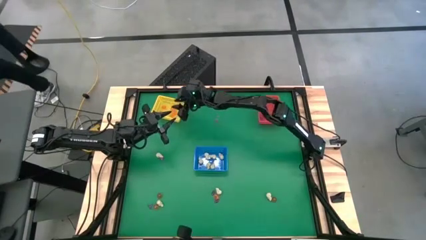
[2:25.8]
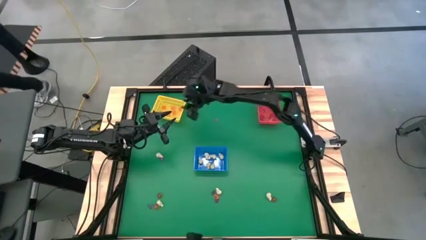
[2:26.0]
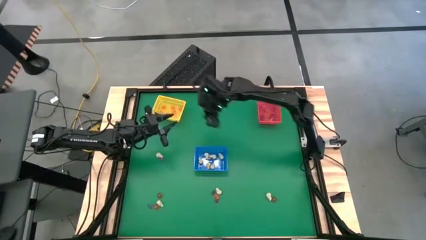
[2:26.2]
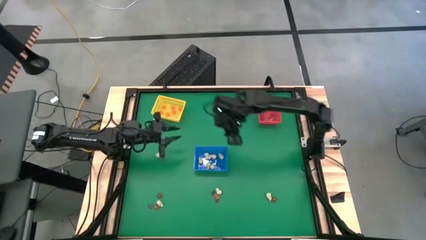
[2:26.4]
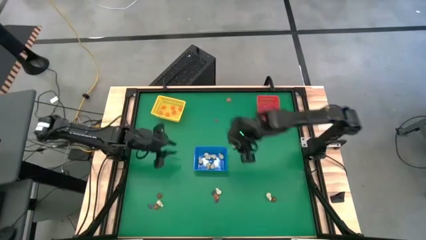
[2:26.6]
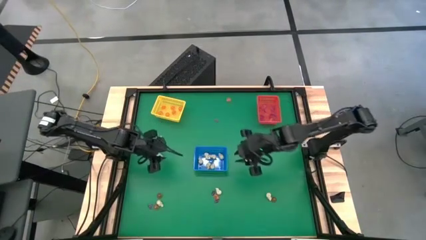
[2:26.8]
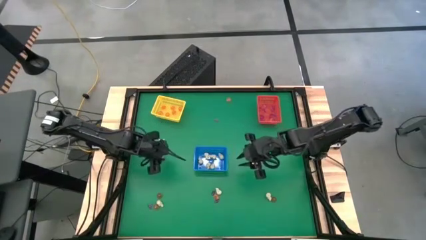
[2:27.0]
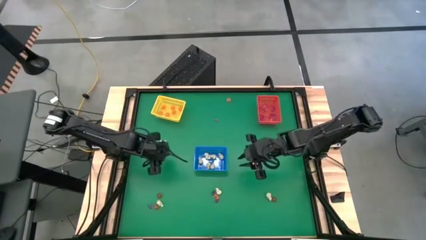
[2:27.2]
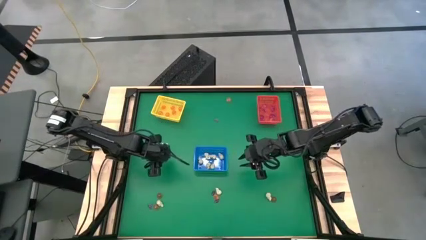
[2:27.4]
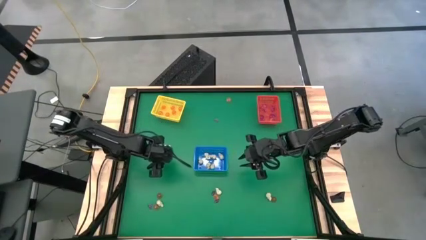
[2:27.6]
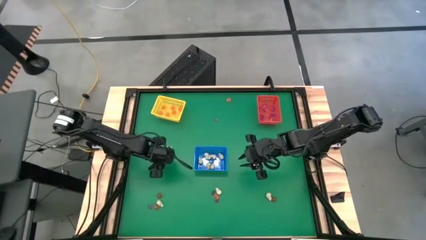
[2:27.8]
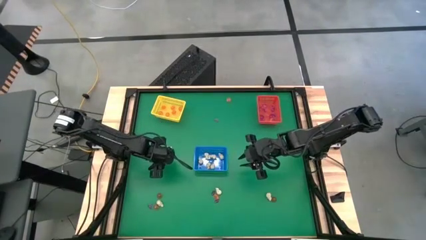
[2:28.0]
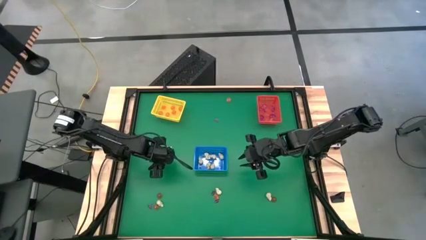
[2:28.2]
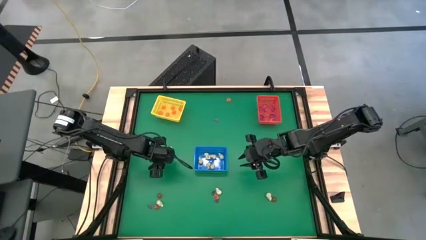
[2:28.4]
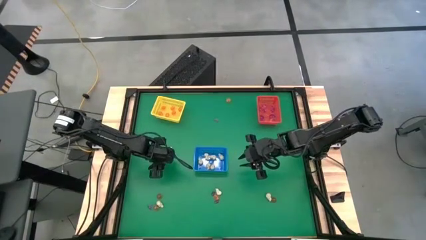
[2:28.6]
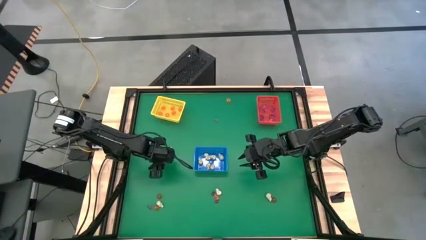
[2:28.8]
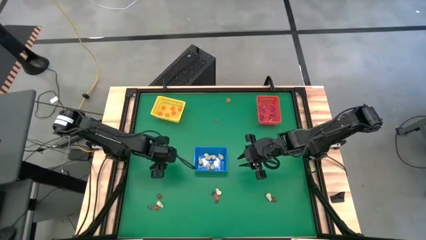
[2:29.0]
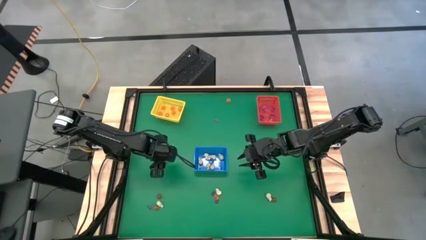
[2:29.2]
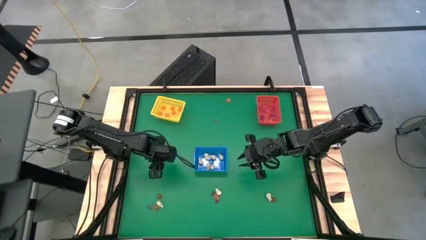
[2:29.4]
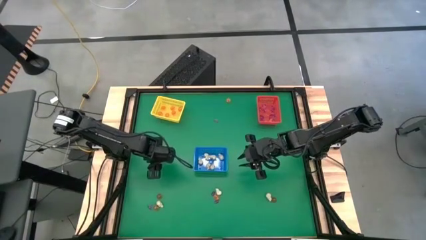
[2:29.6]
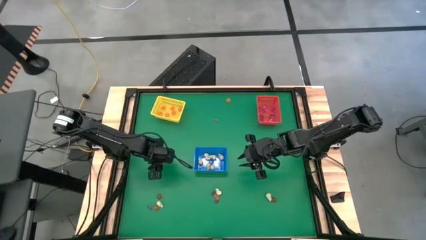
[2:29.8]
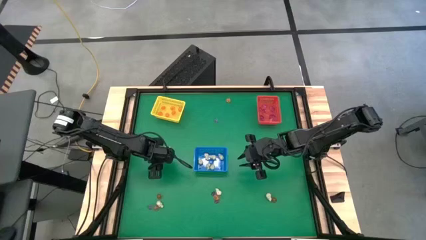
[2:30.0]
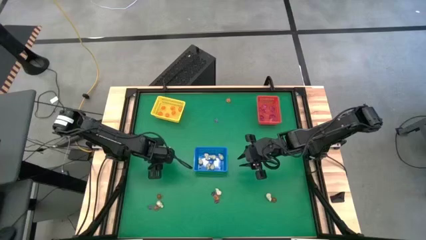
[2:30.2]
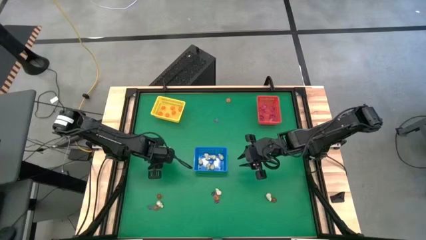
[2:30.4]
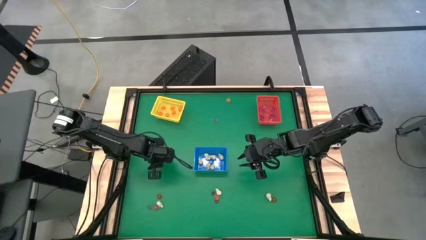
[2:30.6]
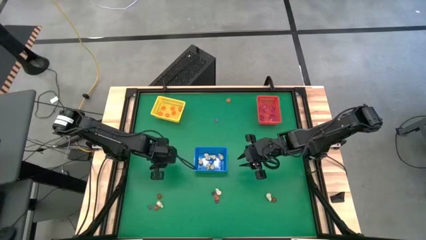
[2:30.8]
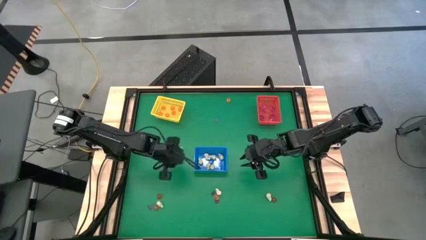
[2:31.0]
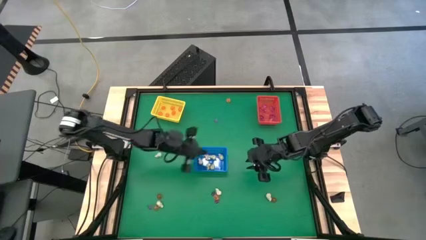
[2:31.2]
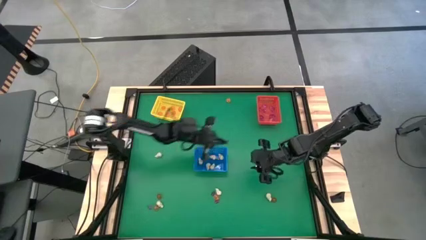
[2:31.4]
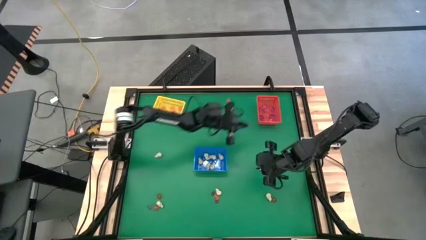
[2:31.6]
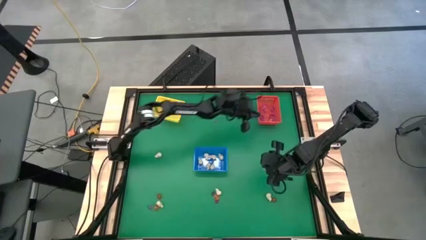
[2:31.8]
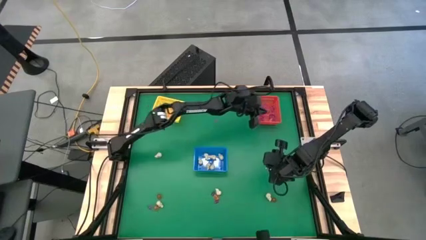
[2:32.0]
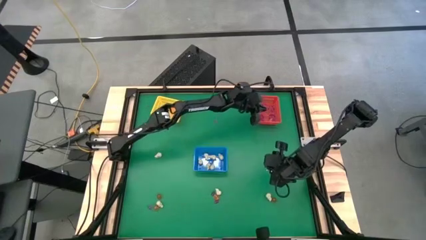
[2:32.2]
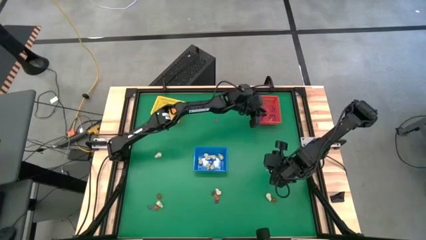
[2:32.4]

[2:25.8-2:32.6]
Task: Sort Halloween decoration
Put the purple witch hat toy into the red bin

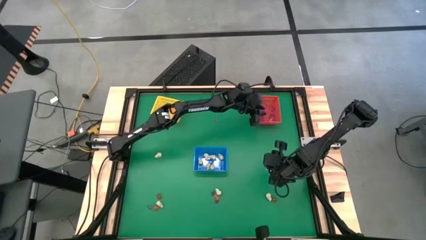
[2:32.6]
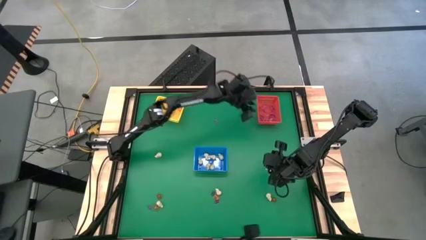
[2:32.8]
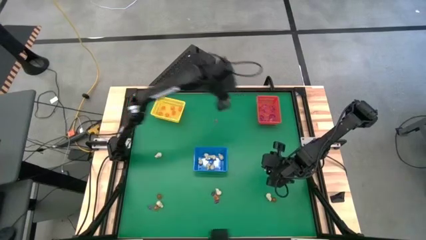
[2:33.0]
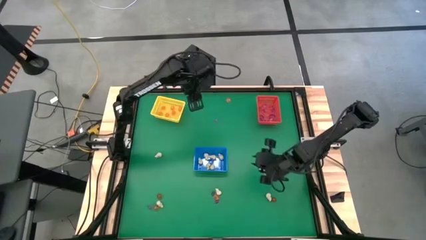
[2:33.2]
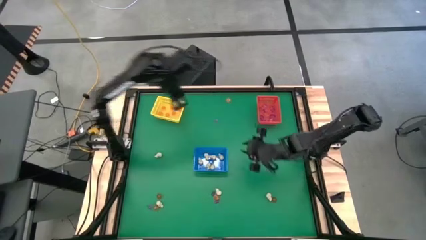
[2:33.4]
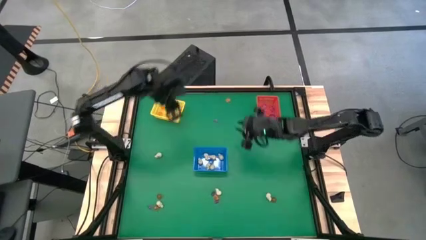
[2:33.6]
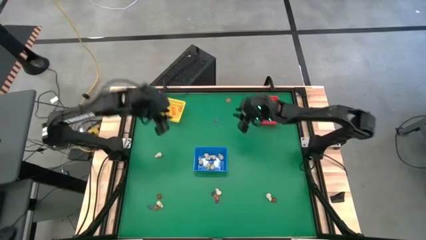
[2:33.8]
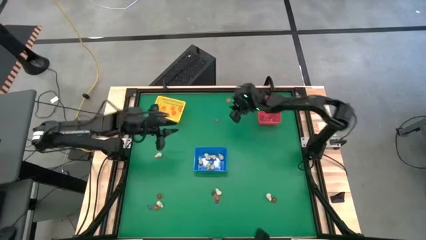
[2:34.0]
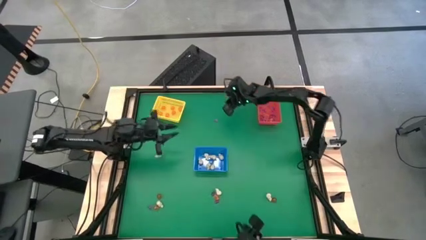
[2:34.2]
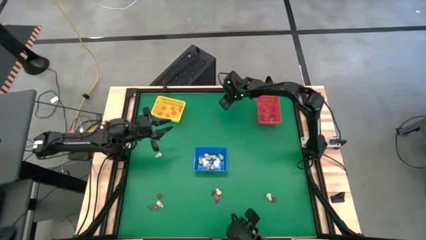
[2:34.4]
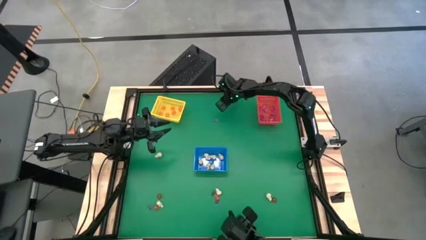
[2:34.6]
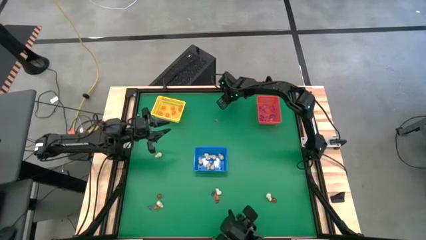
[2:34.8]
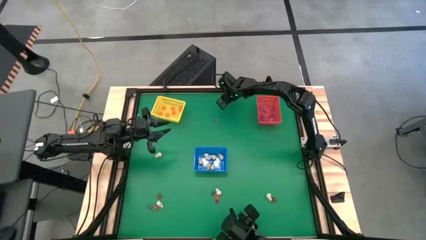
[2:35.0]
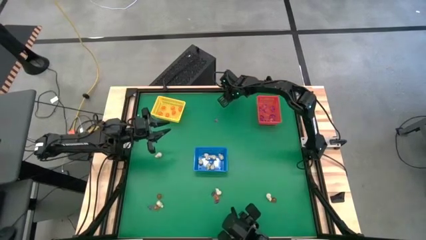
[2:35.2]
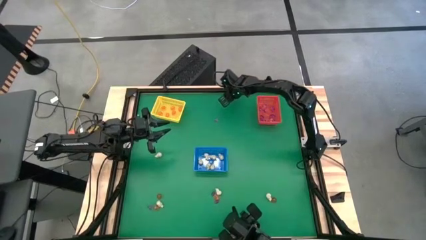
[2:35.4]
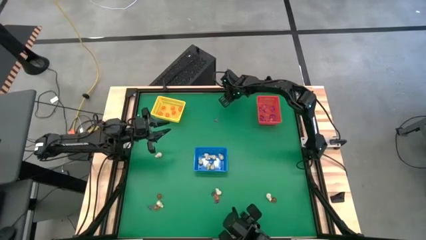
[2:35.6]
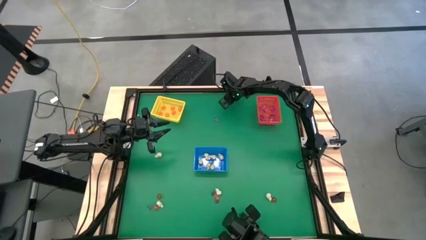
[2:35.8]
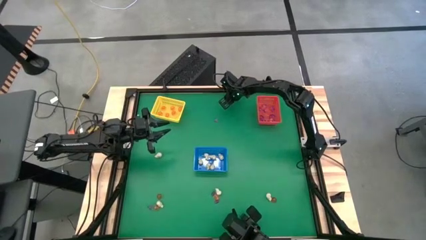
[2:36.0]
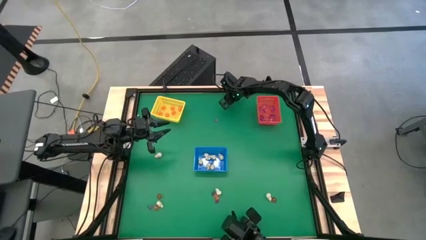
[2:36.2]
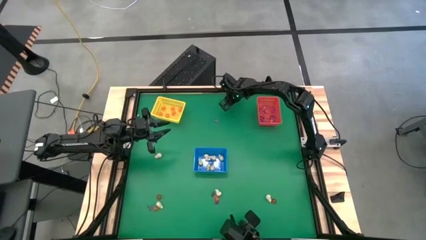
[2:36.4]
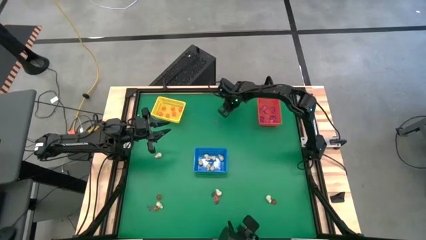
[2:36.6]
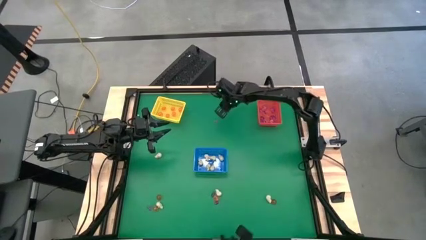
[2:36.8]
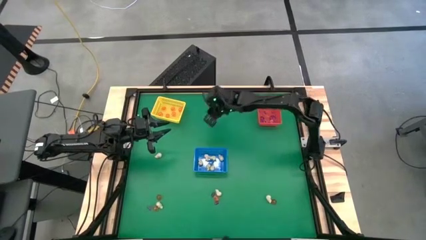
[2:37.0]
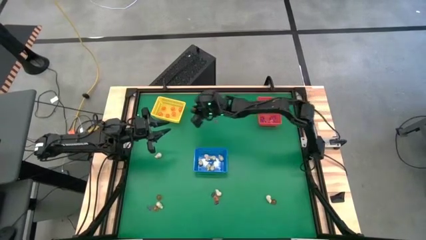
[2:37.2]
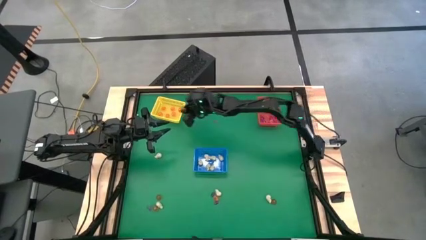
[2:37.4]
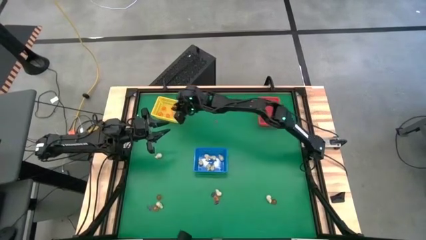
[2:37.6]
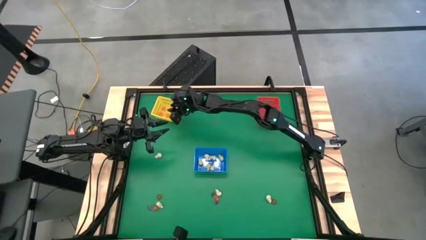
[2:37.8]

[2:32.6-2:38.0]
Put the orange pumpkin toy into the yellow bin

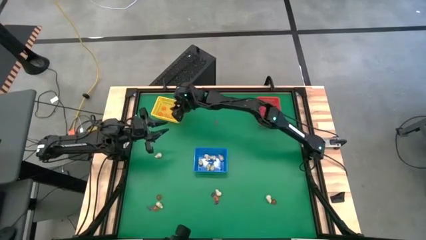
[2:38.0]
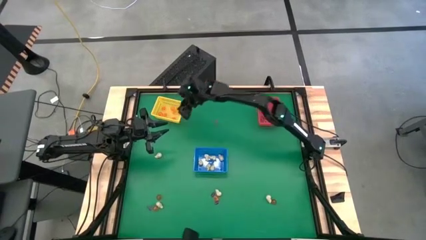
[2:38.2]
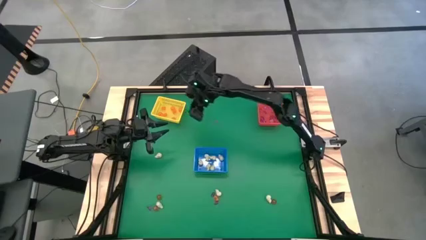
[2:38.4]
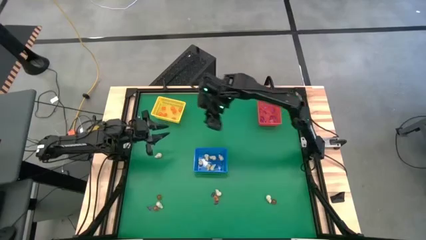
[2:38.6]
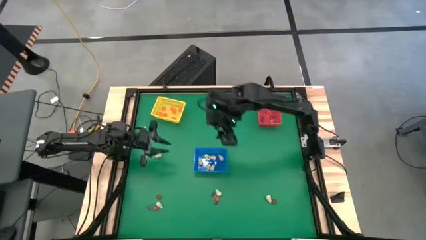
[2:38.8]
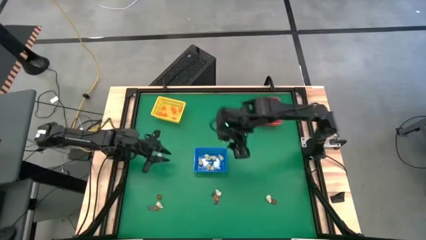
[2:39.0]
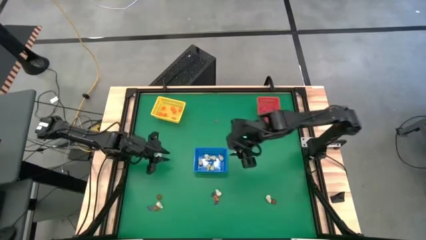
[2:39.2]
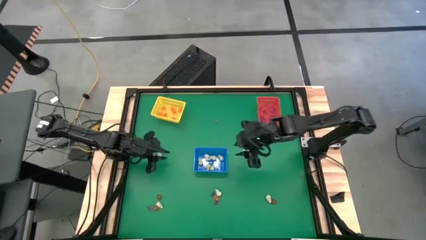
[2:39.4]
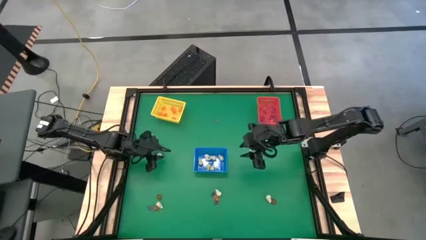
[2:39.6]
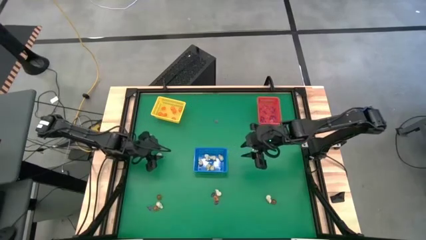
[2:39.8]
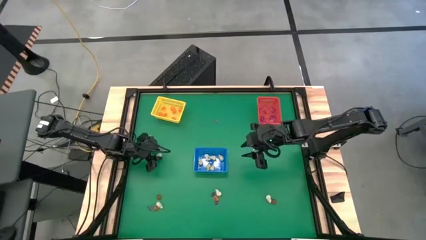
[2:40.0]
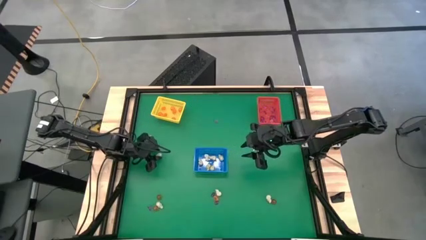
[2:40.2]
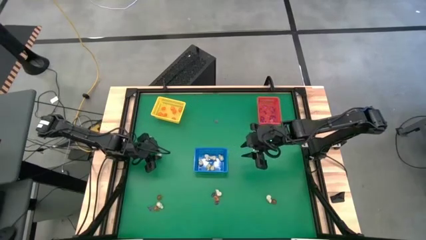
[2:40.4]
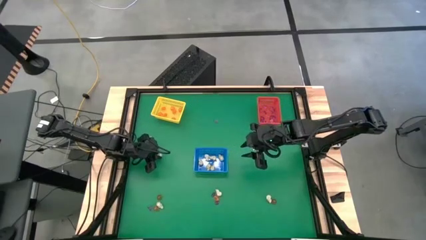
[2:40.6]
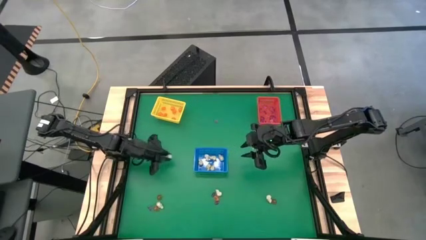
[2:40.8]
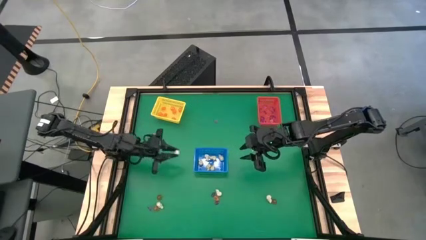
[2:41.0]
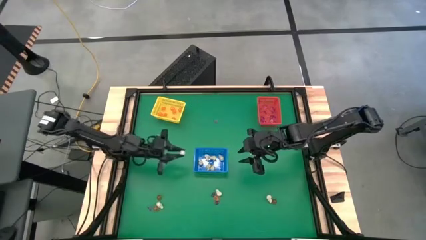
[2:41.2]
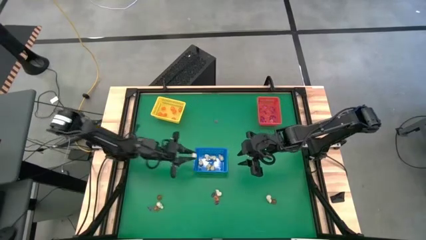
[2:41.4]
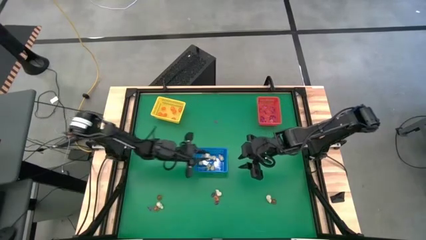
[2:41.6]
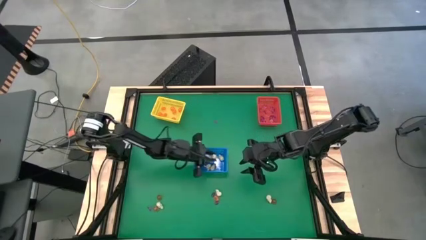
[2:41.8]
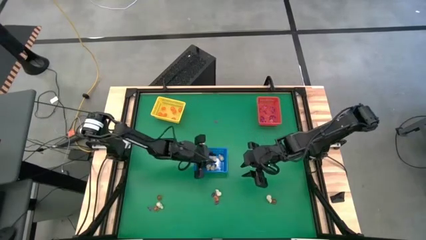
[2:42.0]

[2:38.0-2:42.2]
Put the white skull toy into the blue bin
